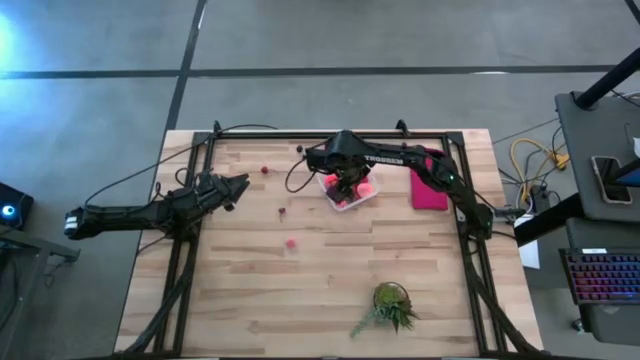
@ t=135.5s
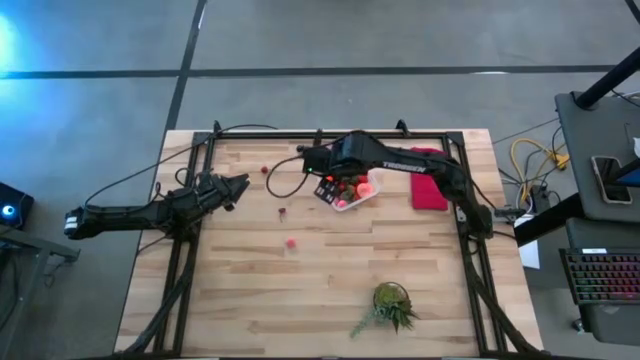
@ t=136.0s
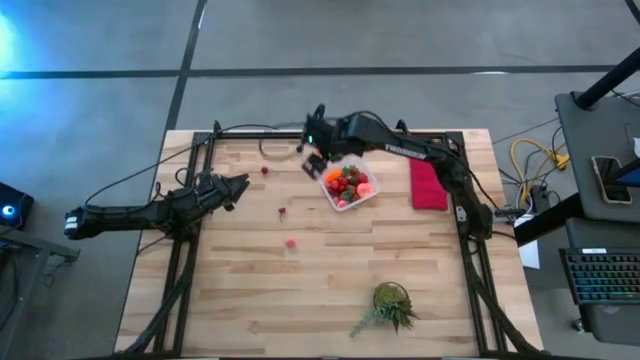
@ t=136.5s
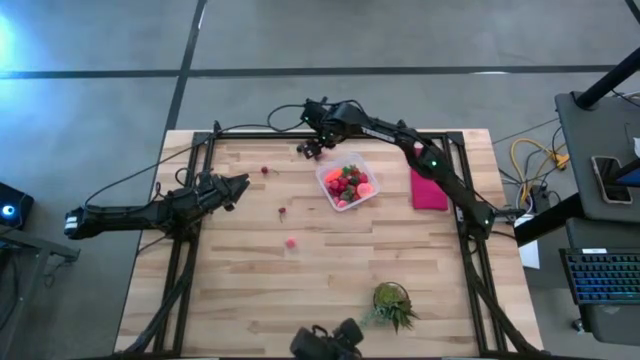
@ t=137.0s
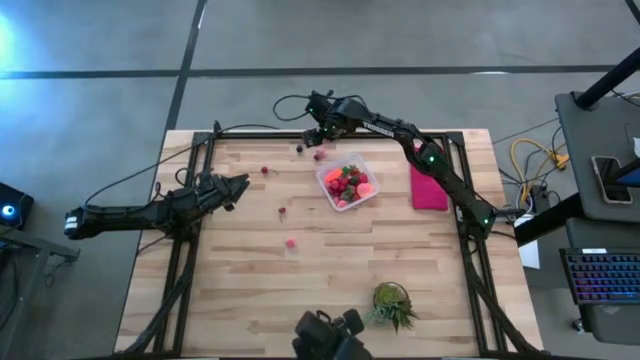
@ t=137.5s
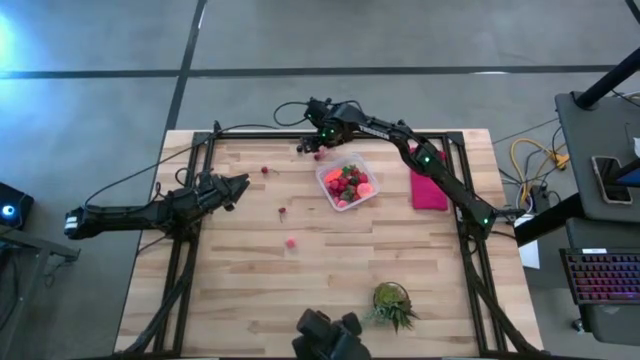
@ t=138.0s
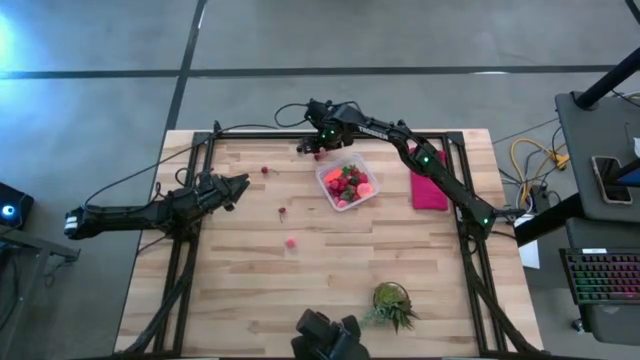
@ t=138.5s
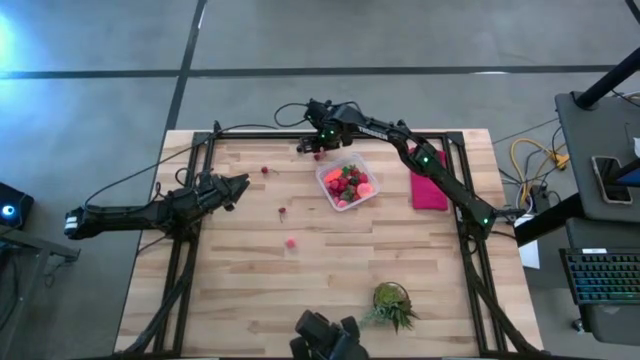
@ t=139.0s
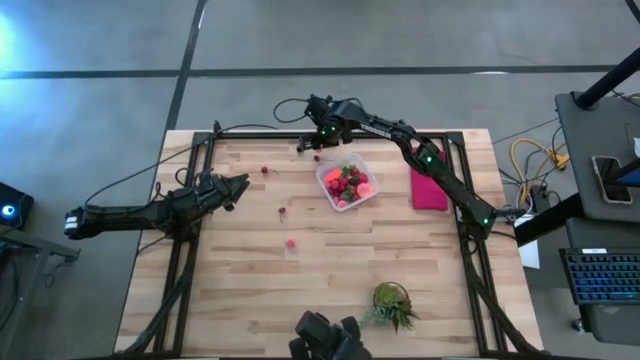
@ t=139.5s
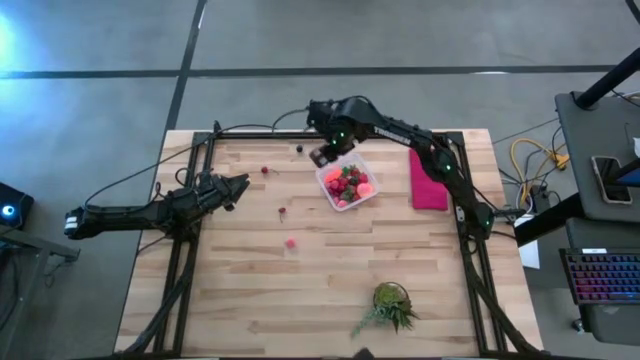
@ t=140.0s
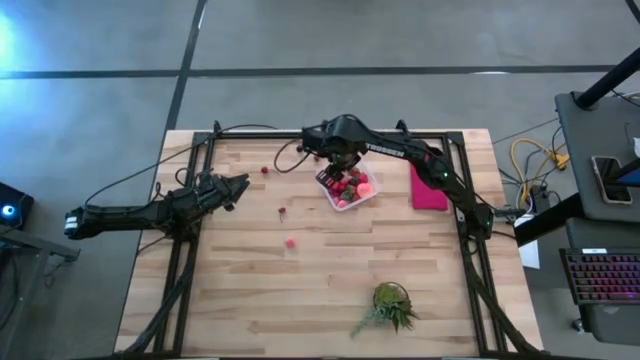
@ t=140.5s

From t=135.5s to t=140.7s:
Task: Pick and placing Produce into tupperware
Put the pink apricot into the transparent container

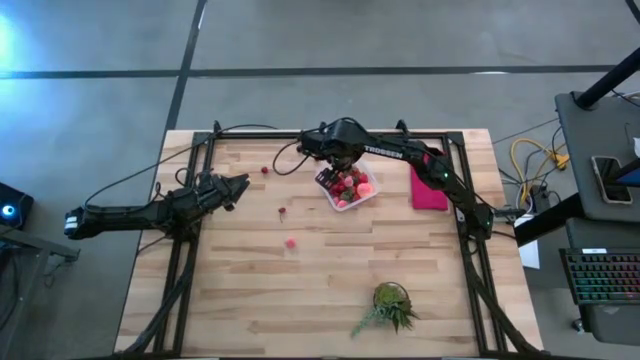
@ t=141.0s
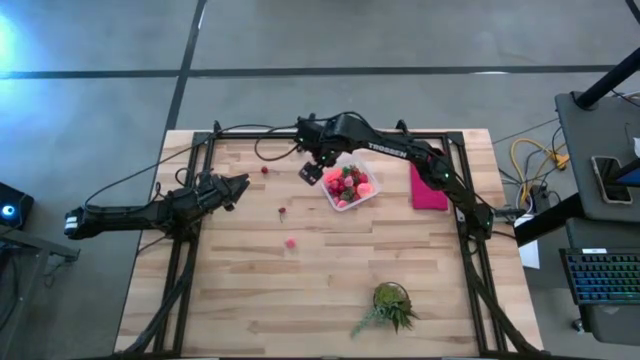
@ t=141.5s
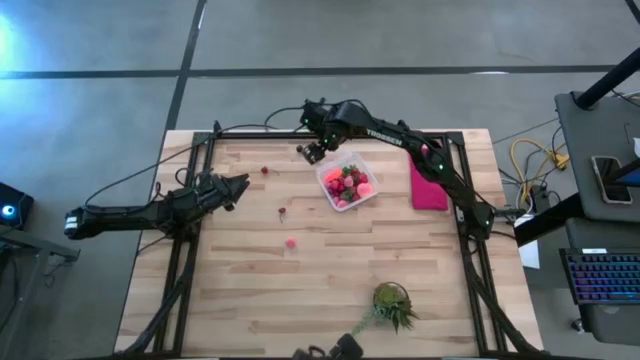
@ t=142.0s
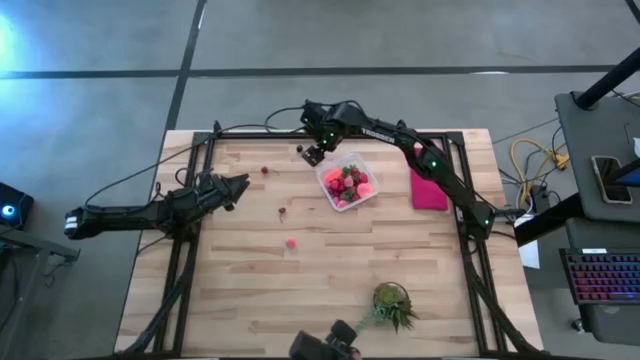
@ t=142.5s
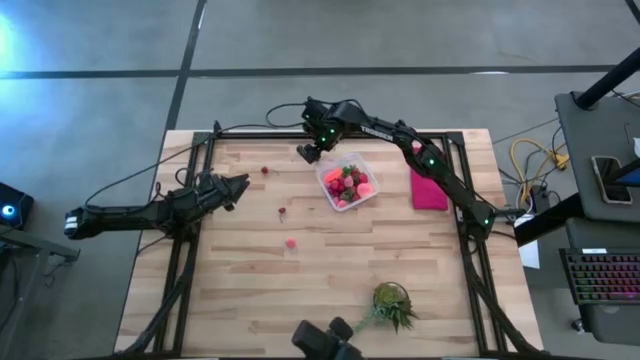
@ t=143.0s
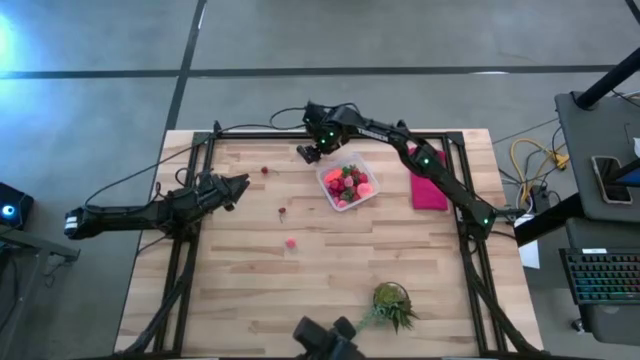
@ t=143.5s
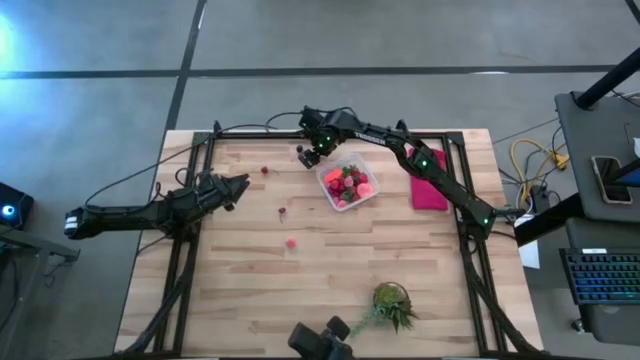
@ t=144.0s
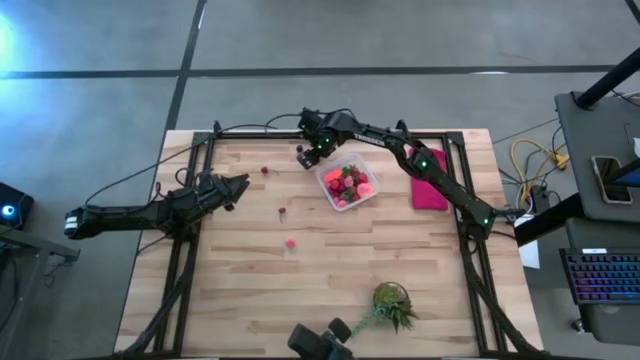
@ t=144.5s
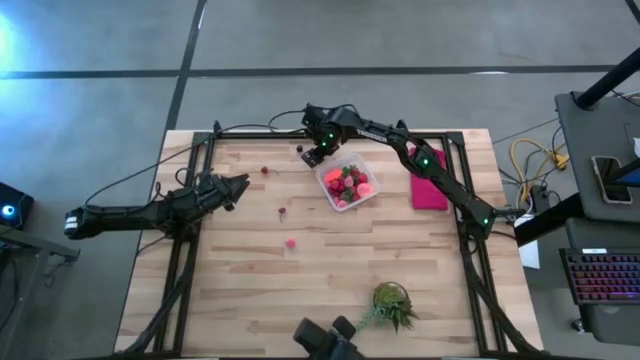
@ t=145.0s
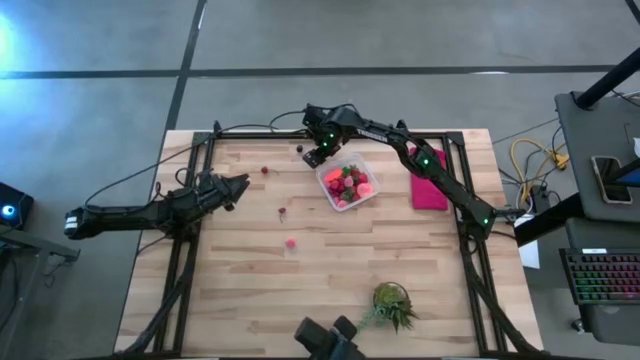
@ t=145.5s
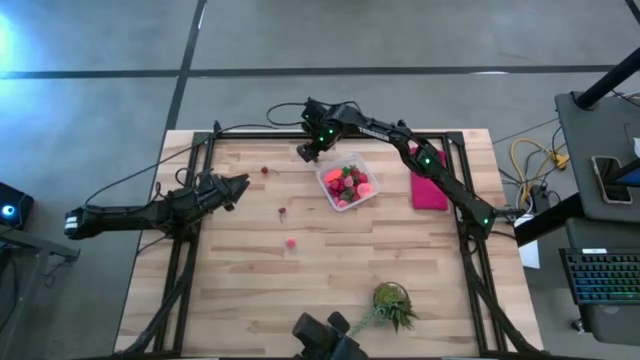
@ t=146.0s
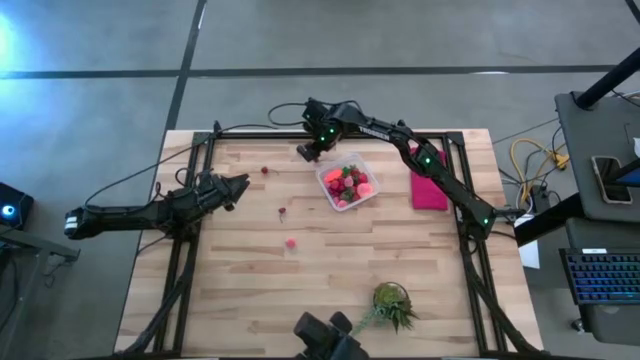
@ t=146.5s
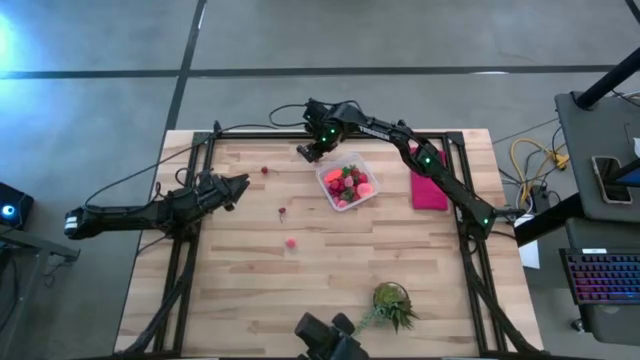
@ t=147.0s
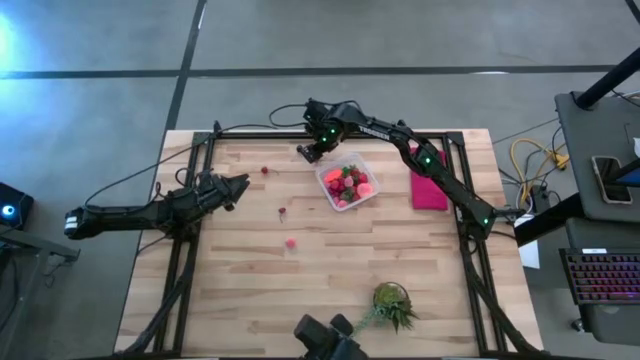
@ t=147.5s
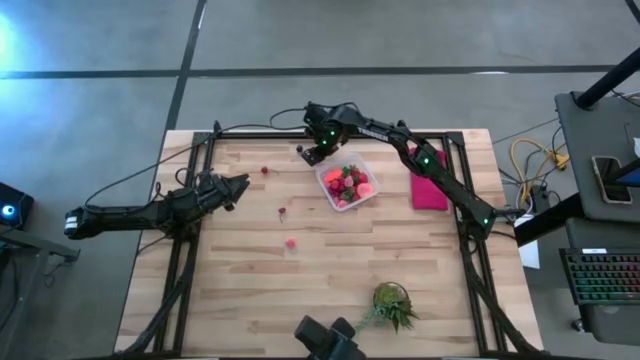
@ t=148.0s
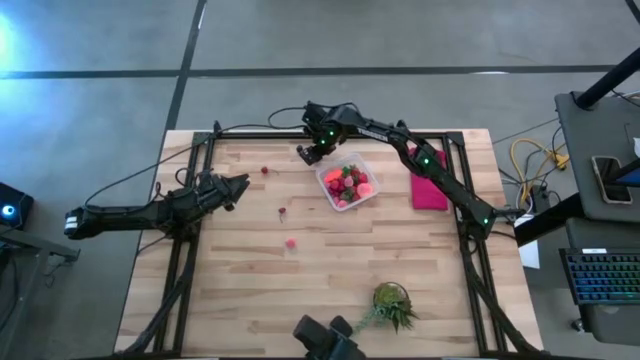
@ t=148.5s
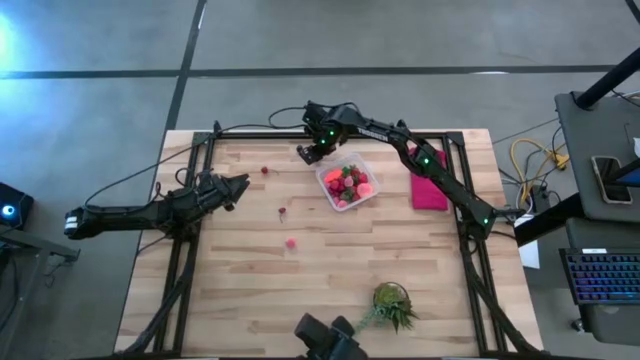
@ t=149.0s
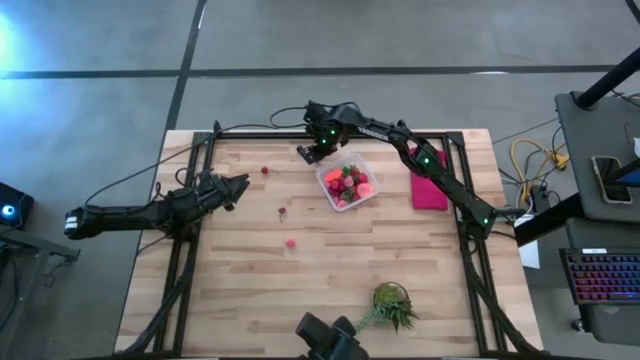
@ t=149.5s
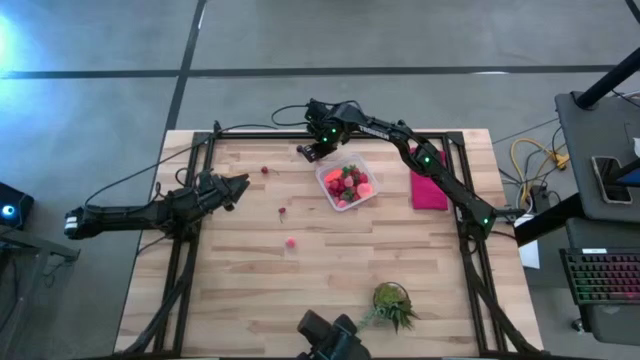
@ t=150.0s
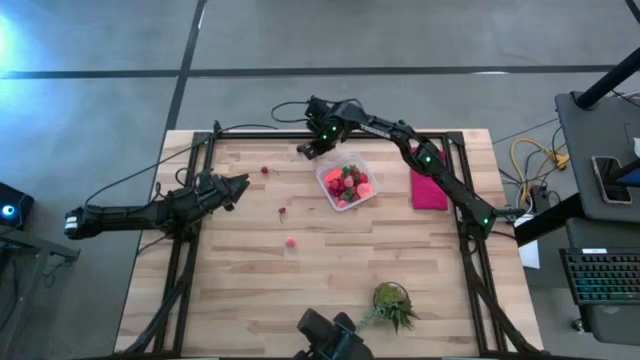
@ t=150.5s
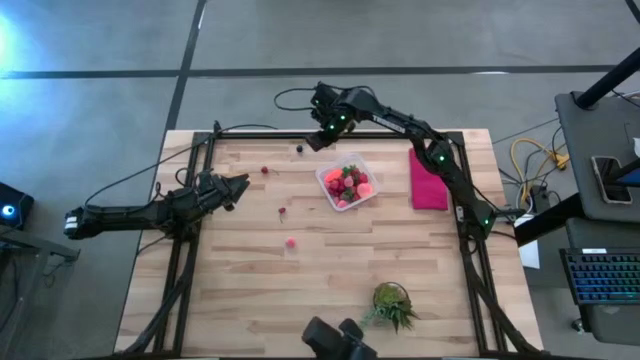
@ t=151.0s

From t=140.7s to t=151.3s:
Put the red cherry into the transparent container

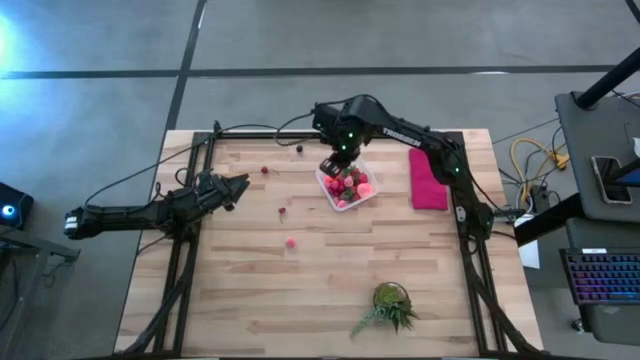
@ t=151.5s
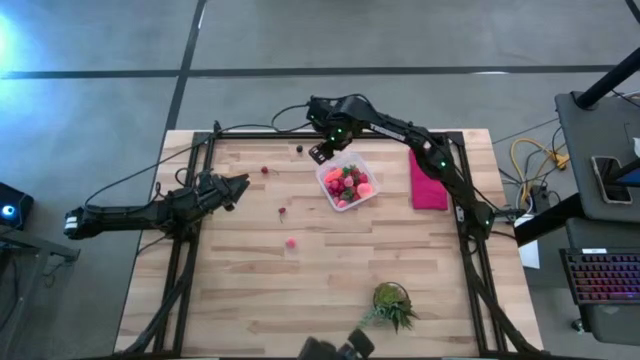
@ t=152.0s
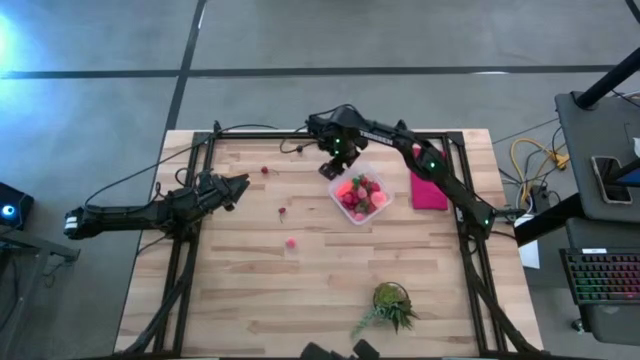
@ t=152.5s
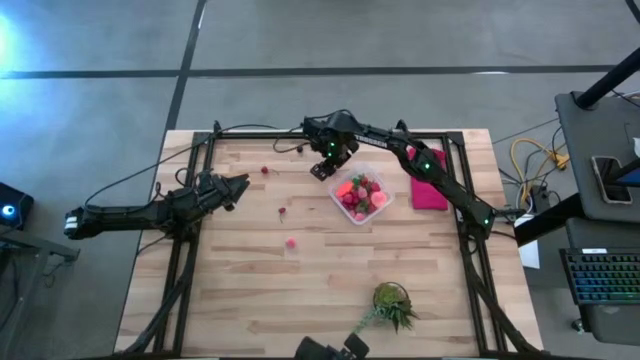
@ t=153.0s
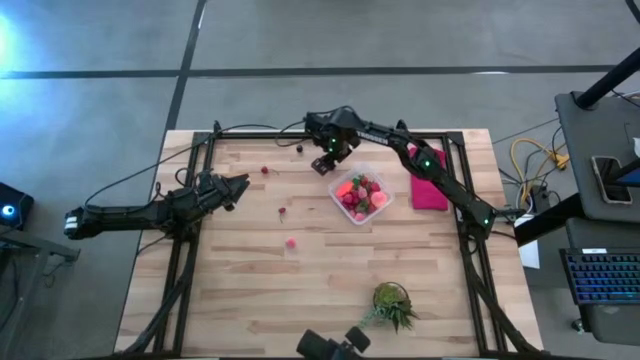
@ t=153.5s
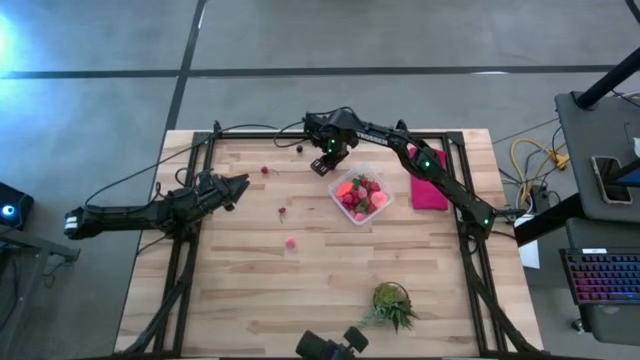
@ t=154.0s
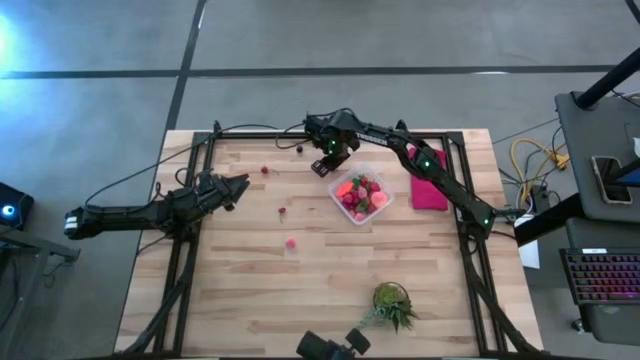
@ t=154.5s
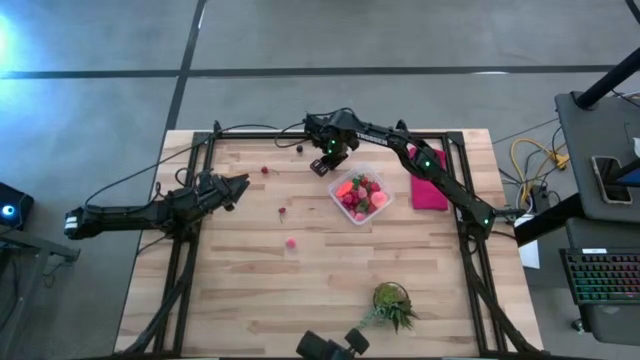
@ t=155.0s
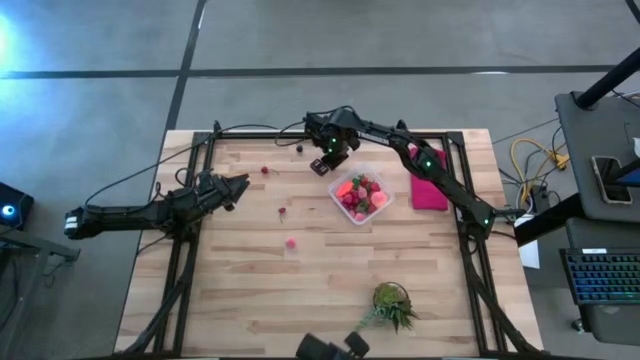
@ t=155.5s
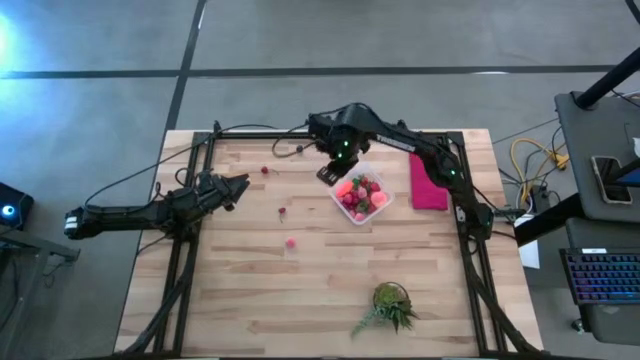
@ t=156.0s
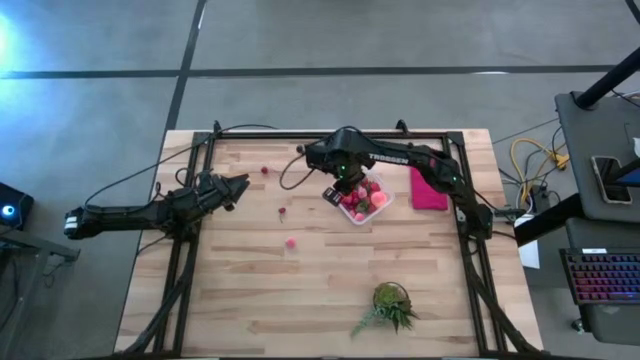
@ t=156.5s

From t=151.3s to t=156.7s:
Put the red cherry into the transparent container
